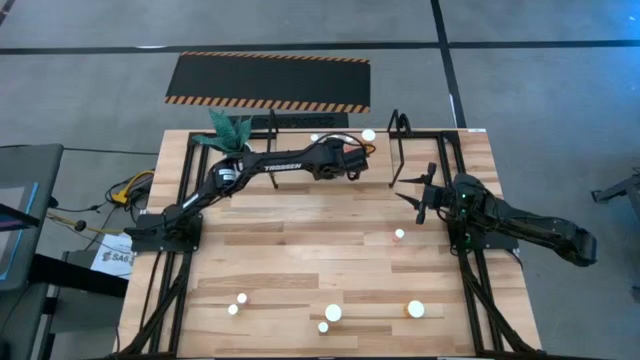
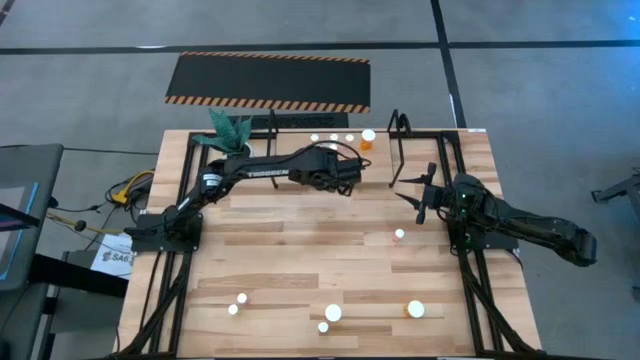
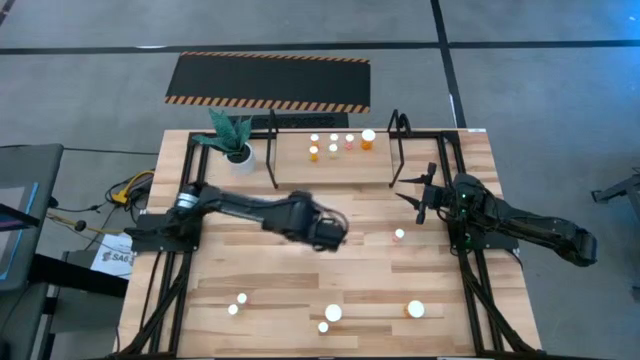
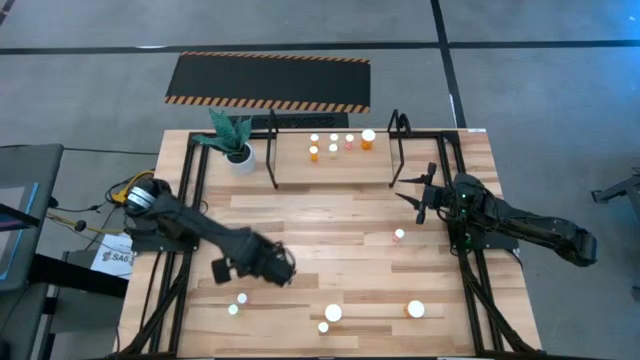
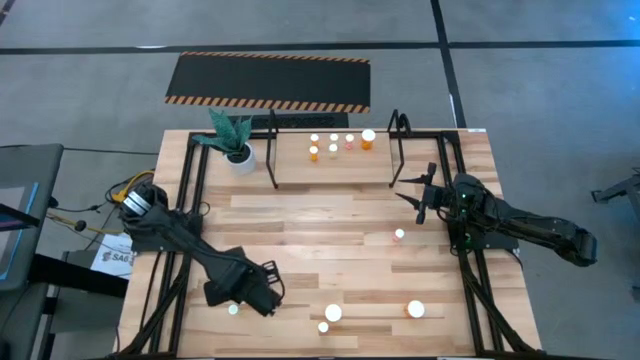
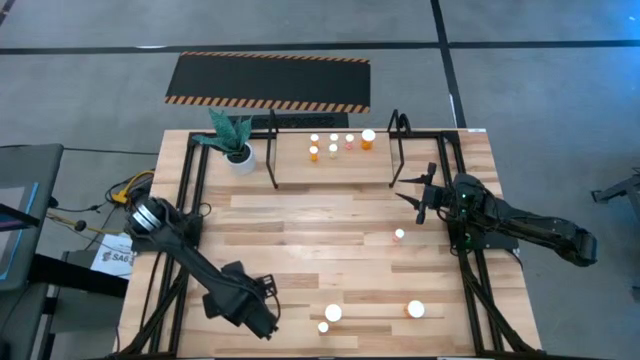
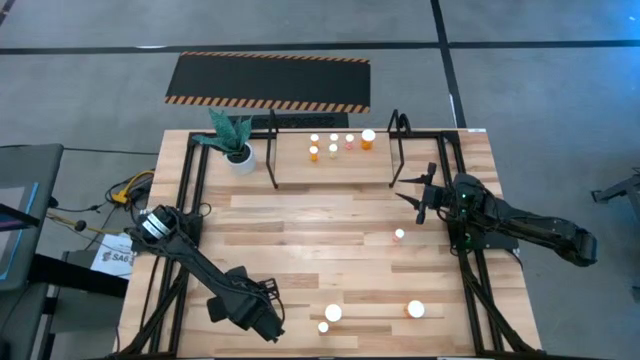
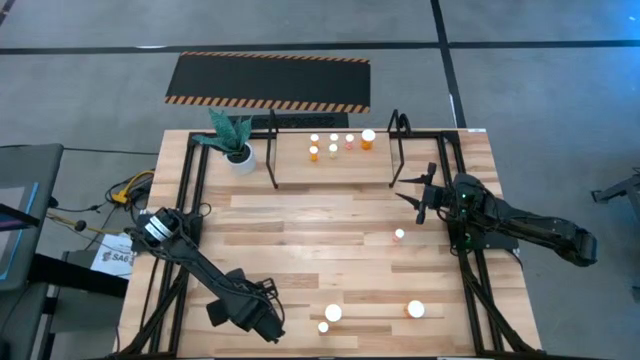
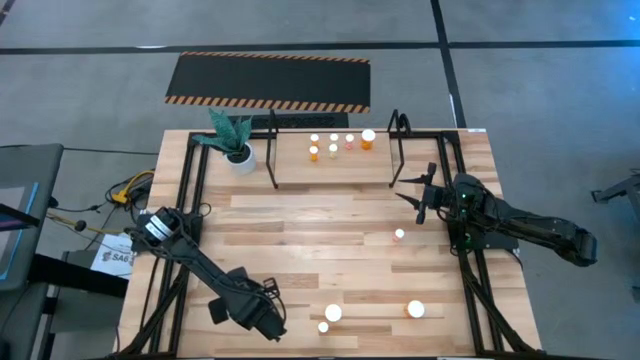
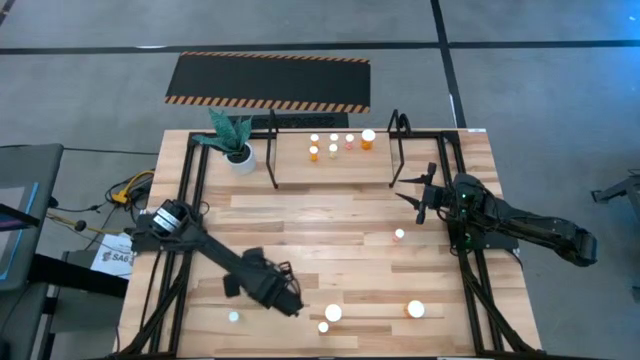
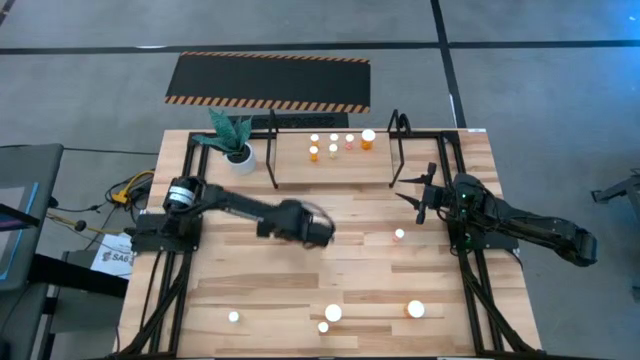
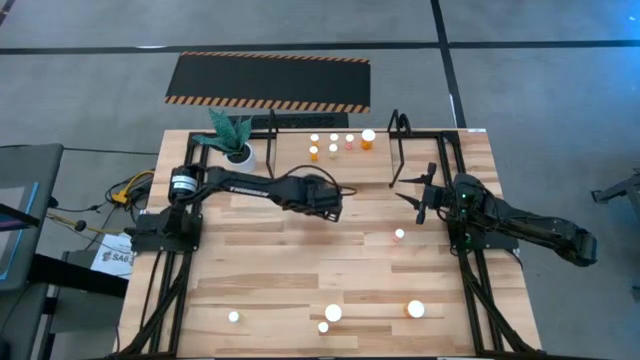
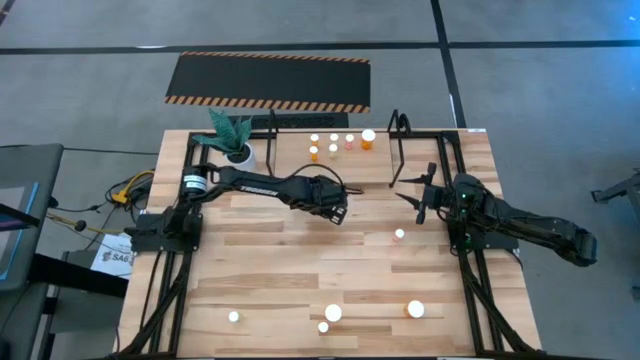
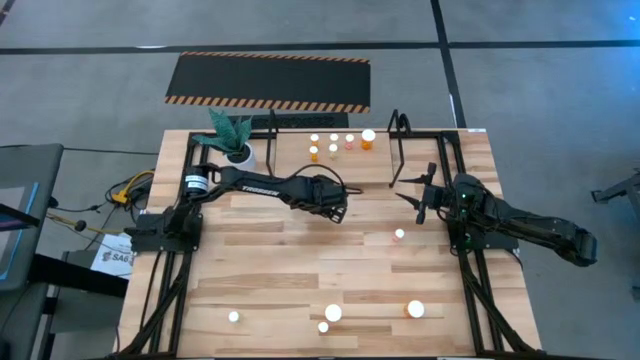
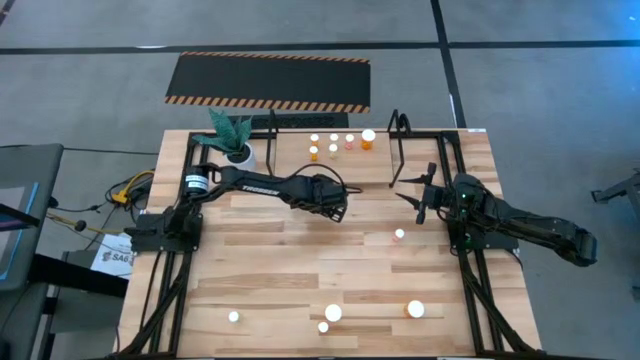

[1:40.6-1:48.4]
Task: Pick and place medicine bottles onto shelf by color
Move the bottom small pink pill bottle to the center of the table

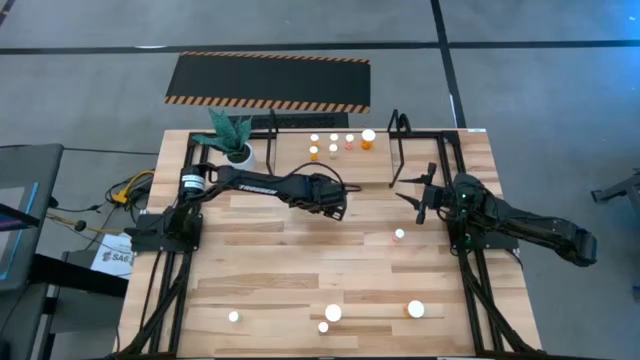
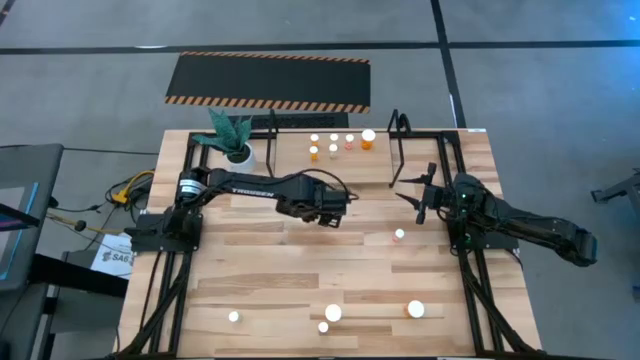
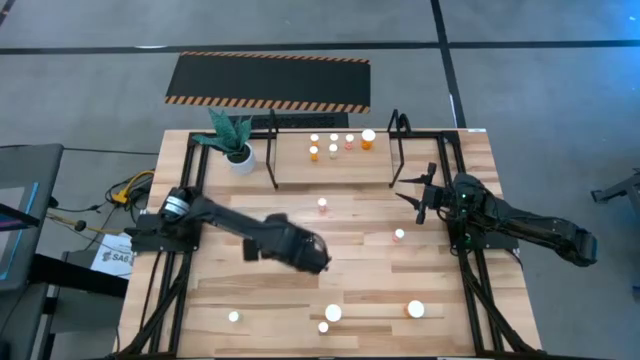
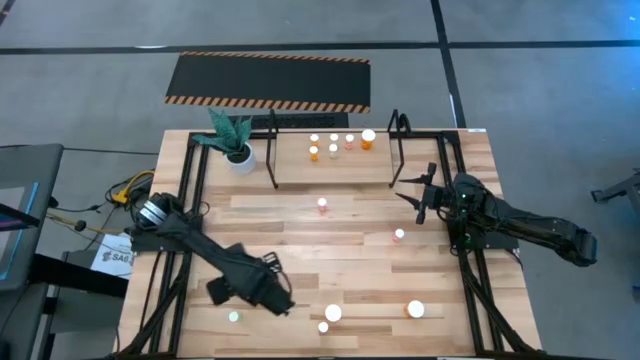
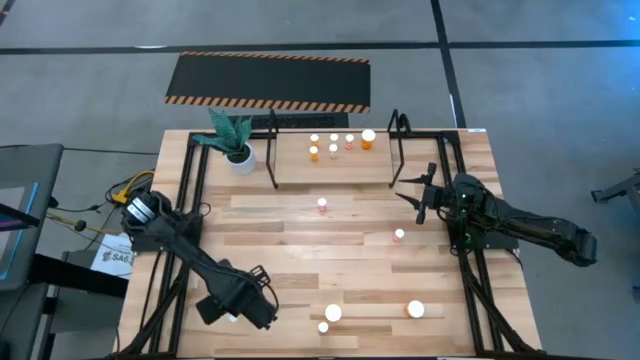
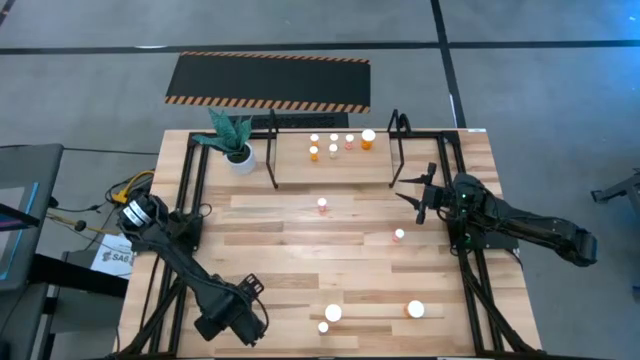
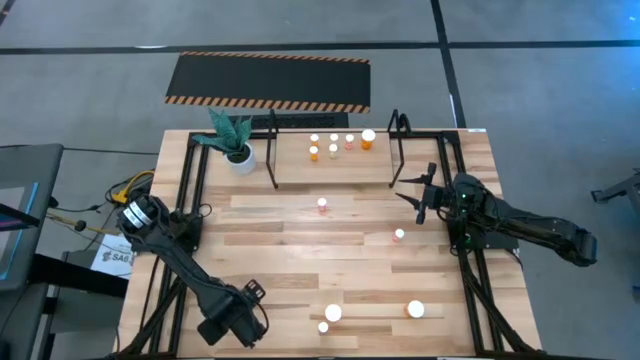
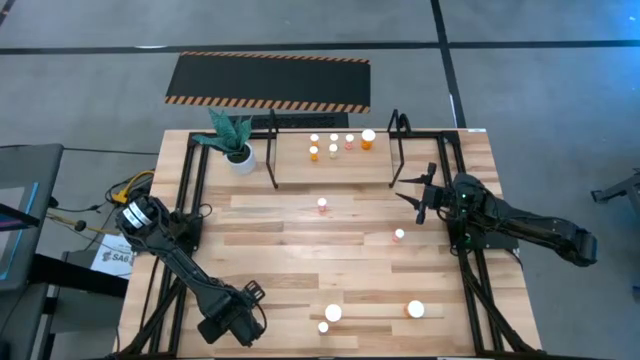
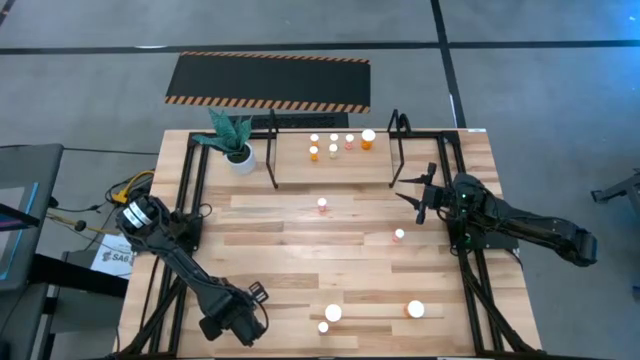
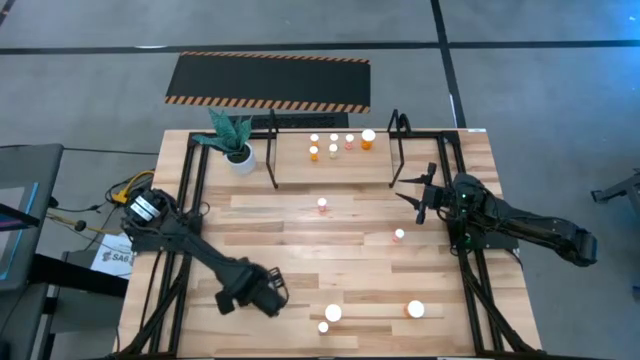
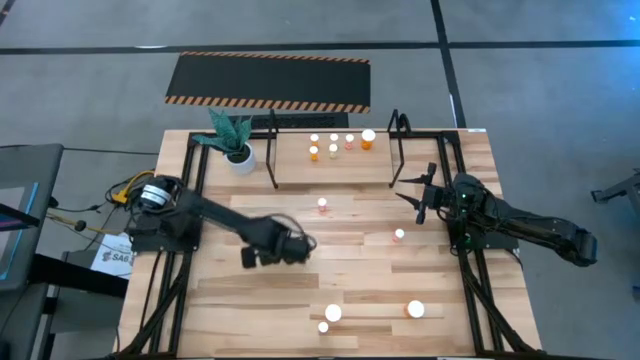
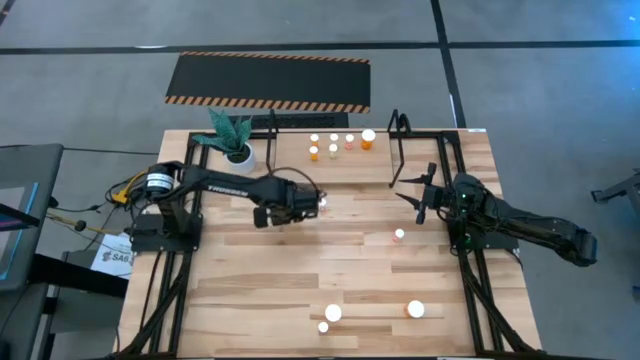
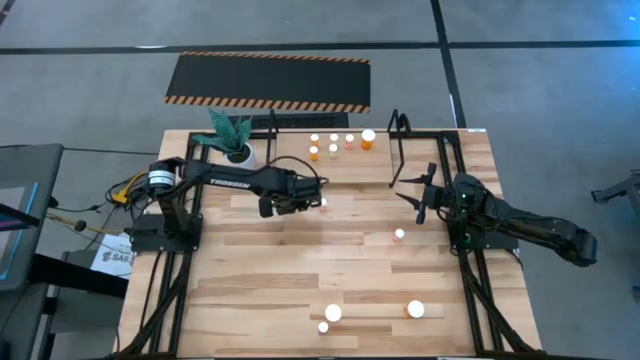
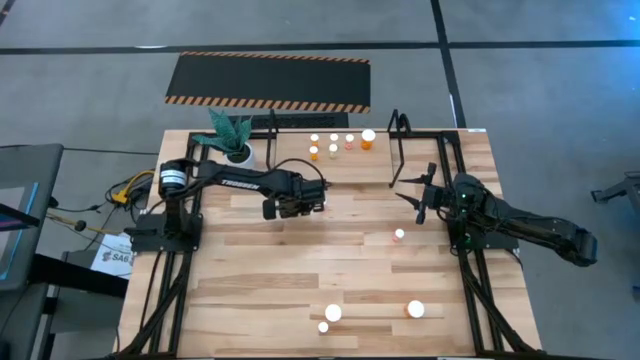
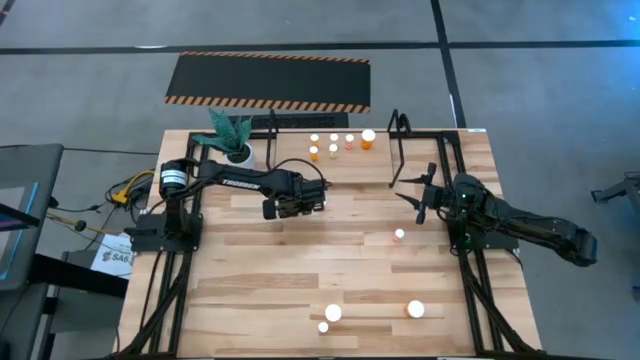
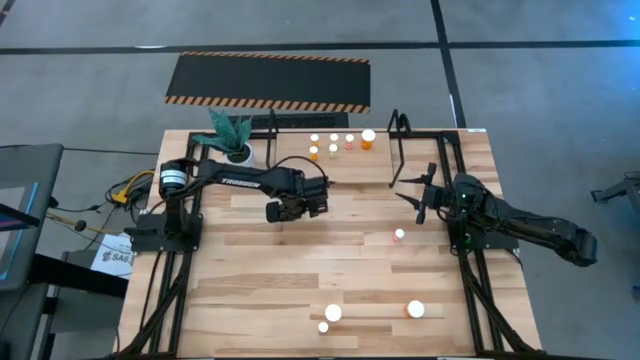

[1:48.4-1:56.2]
Move the yellow pill bottle to the center of the table

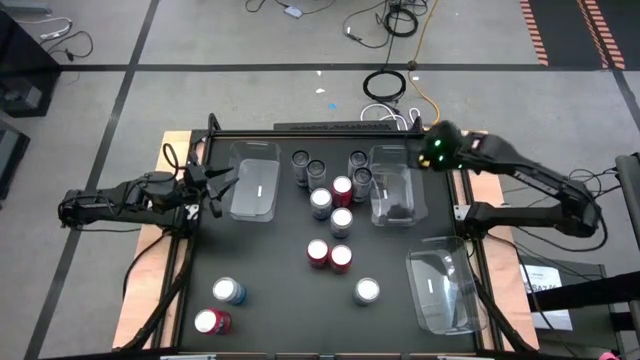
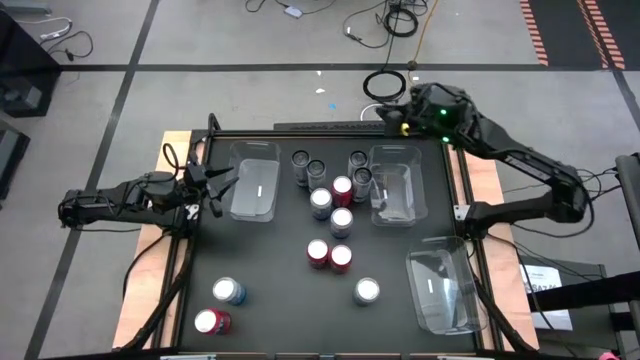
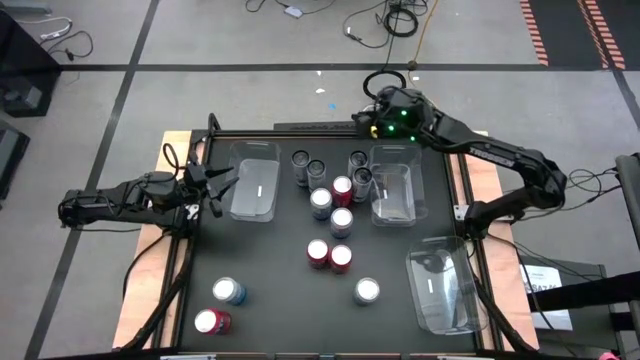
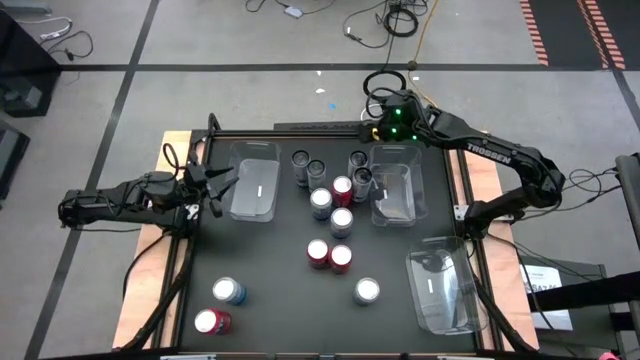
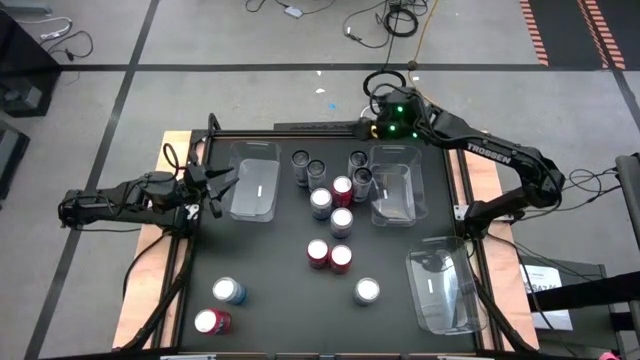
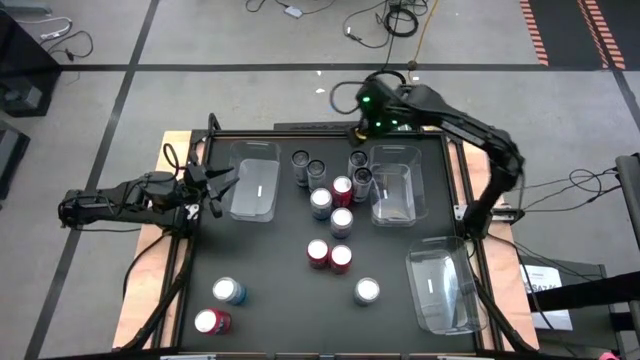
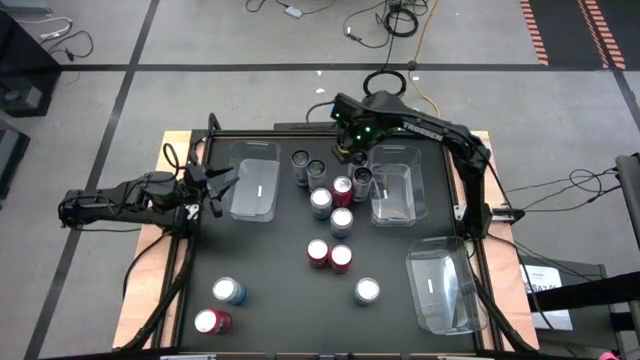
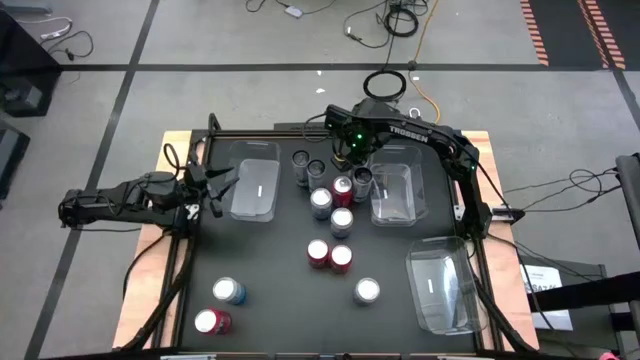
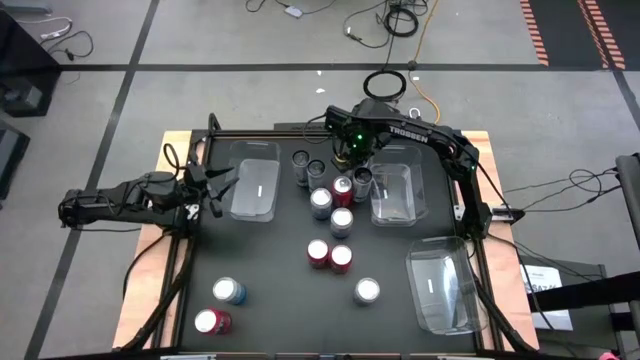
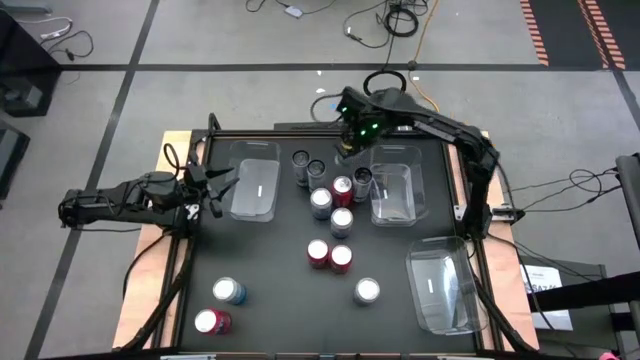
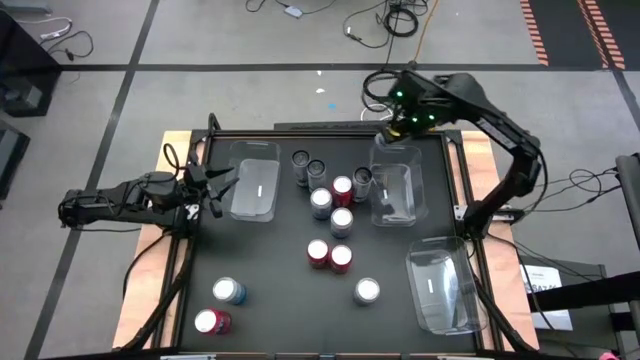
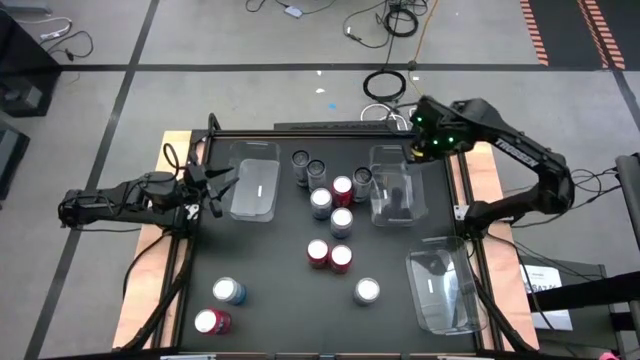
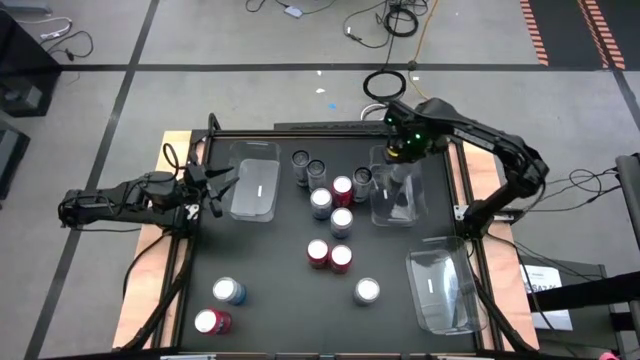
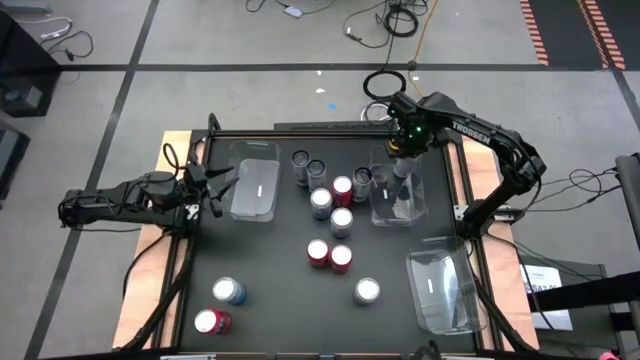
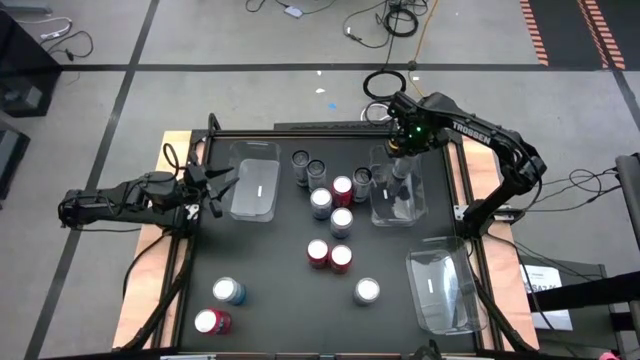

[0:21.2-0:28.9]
Task: Sort soda cans
Put the white soda can into the top right transparent bin
